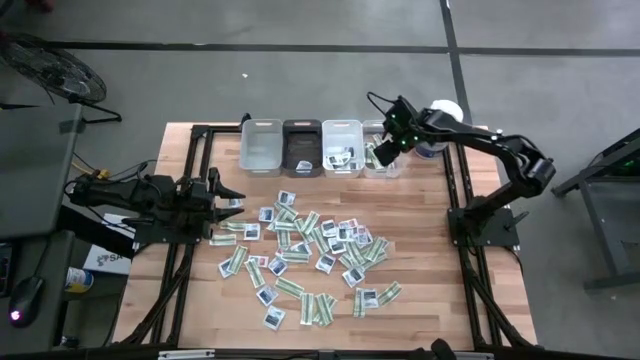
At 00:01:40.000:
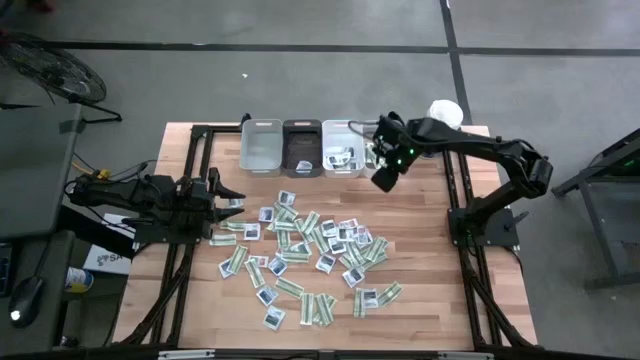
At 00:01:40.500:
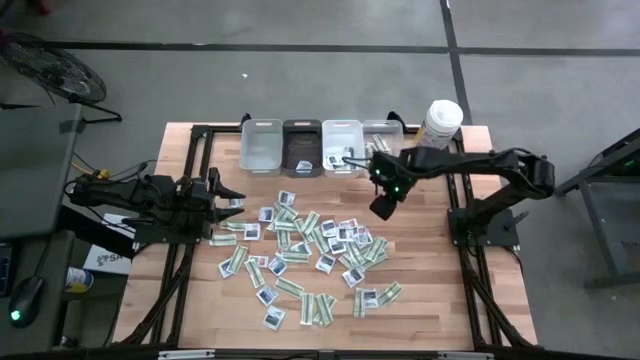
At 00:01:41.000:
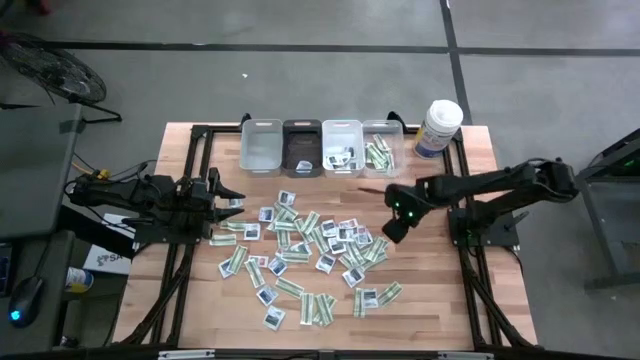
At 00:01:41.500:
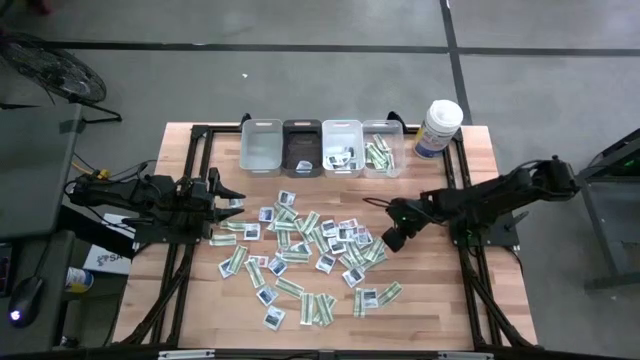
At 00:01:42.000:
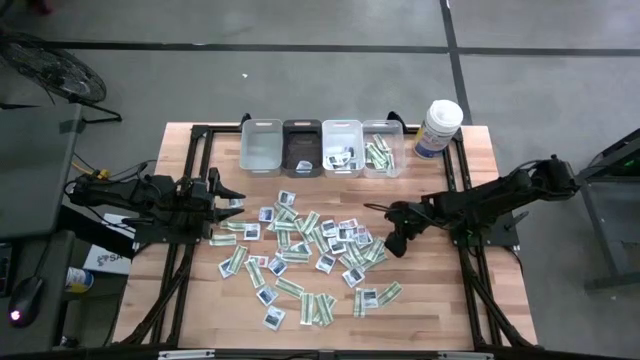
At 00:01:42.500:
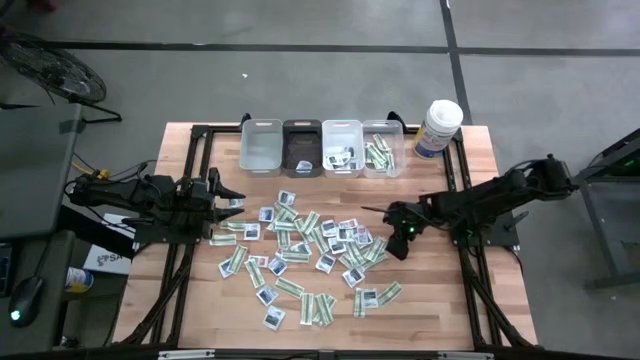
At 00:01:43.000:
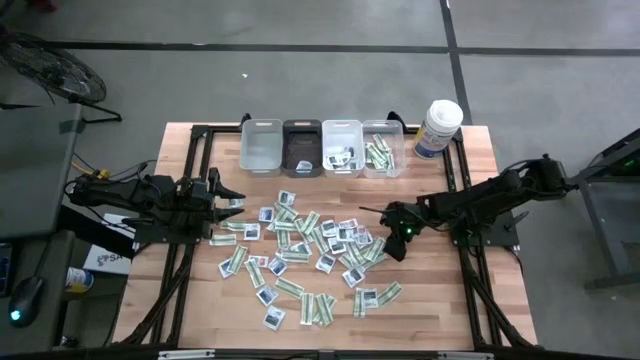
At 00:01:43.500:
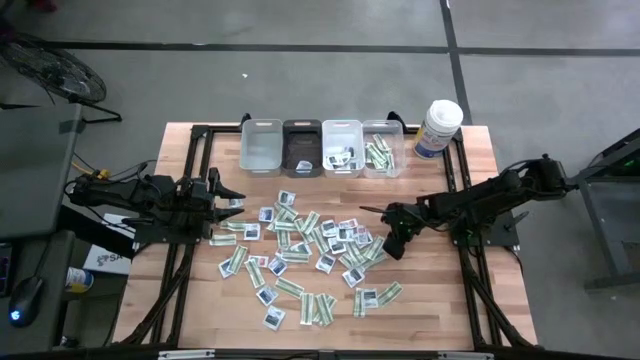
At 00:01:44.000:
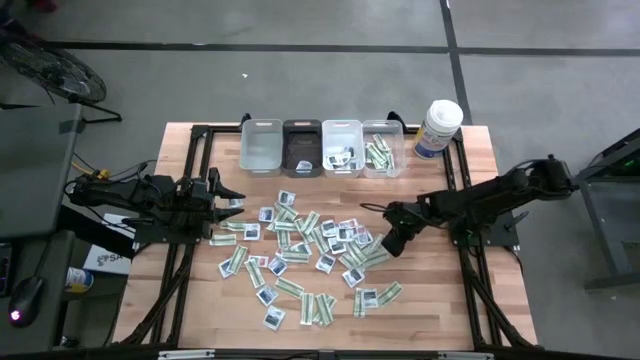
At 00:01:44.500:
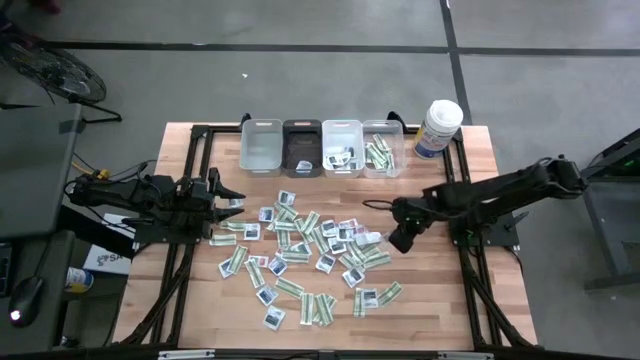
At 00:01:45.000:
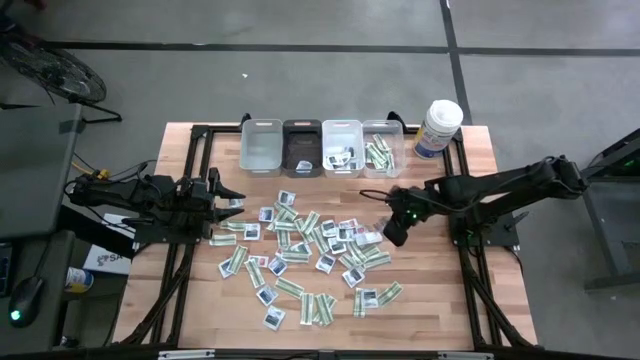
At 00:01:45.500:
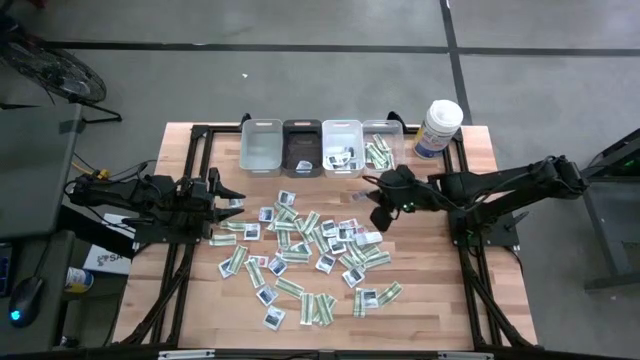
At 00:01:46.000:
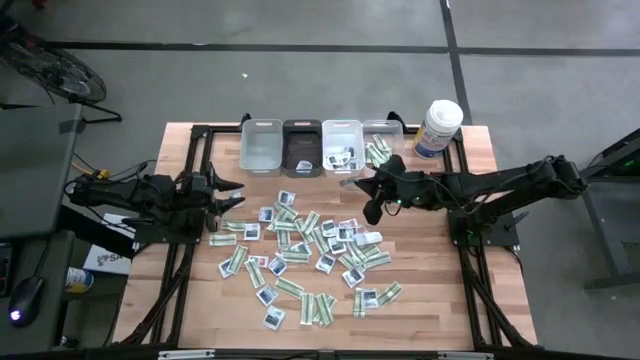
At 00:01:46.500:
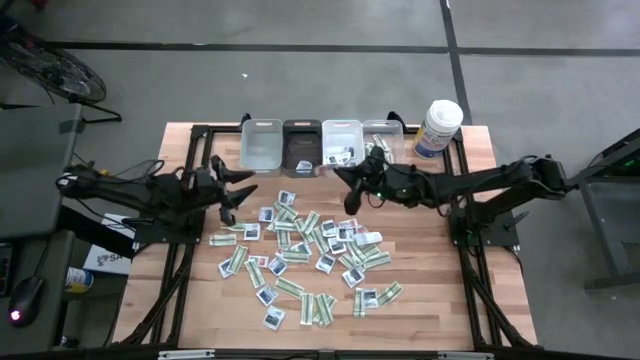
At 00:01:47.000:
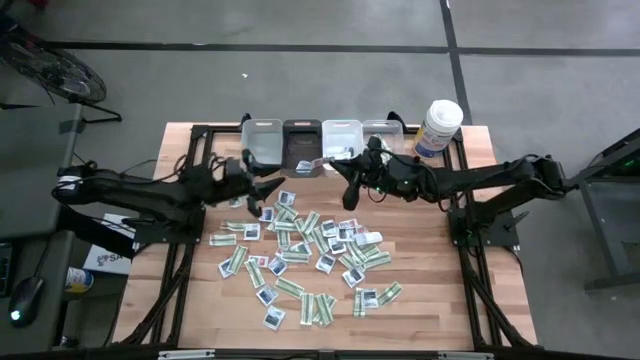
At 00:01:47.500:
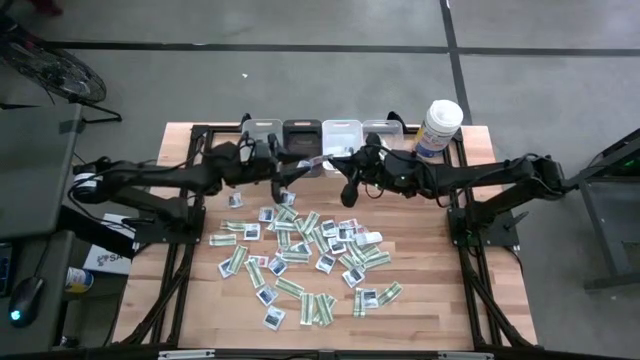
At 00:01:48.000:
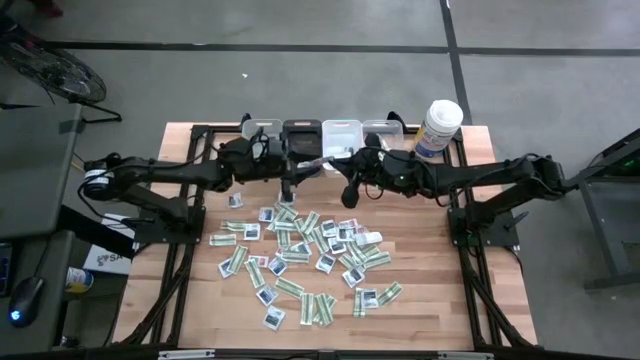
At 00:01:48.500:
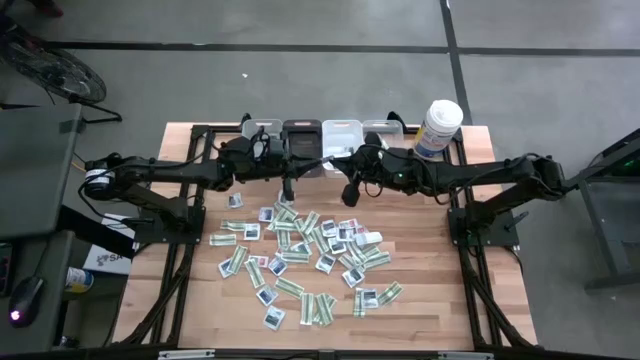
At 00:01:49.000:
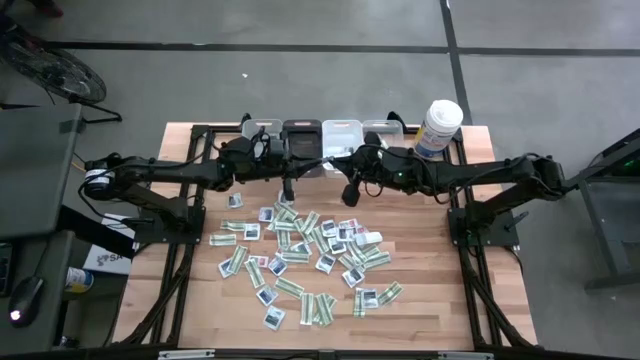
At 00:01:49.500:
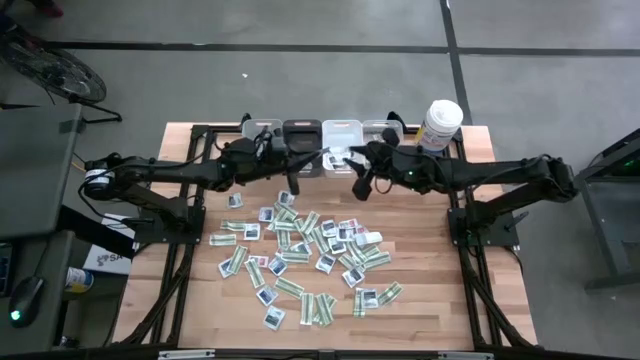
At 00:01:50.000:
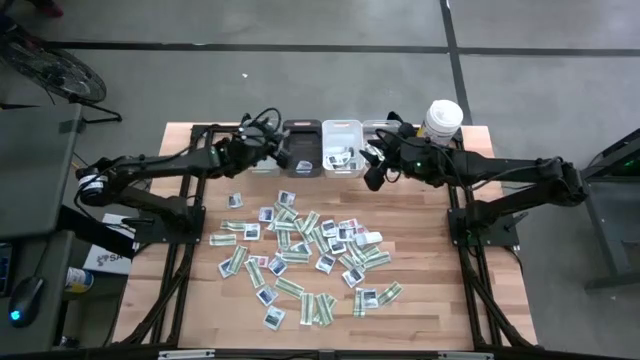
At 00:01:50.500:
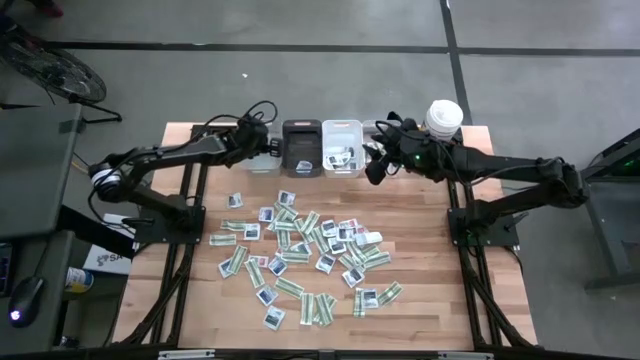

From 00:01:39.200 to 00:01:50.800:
Task: Pick & Place First Aid Supplies
Put the orange ointment pack into the gray bin

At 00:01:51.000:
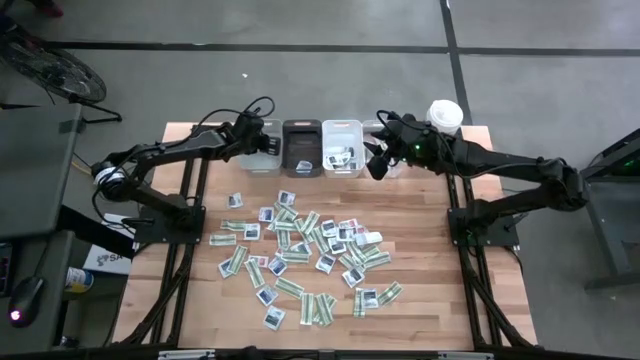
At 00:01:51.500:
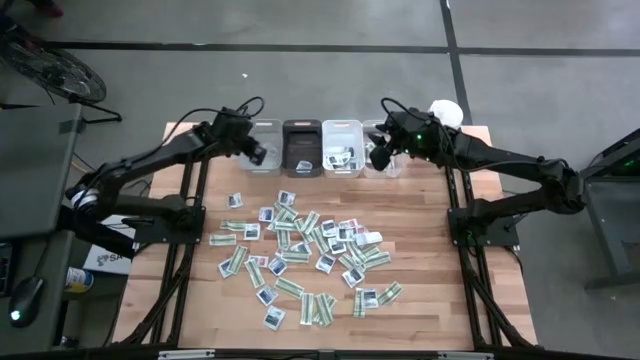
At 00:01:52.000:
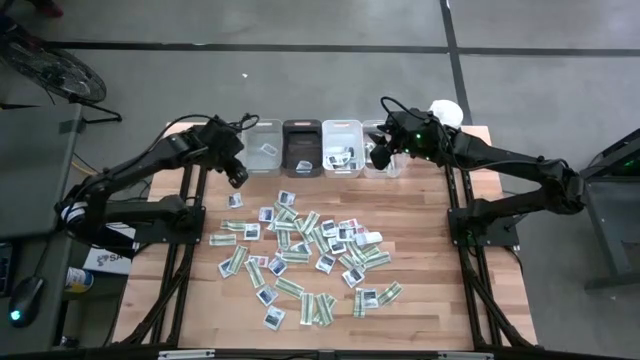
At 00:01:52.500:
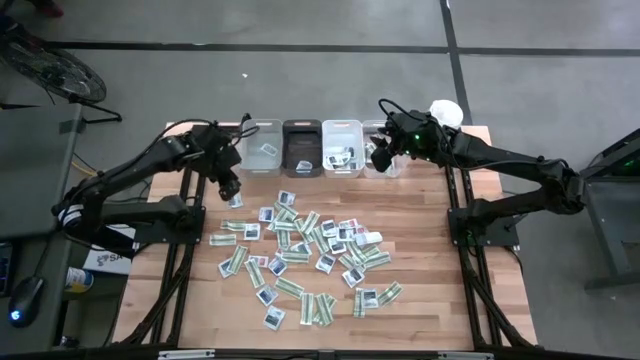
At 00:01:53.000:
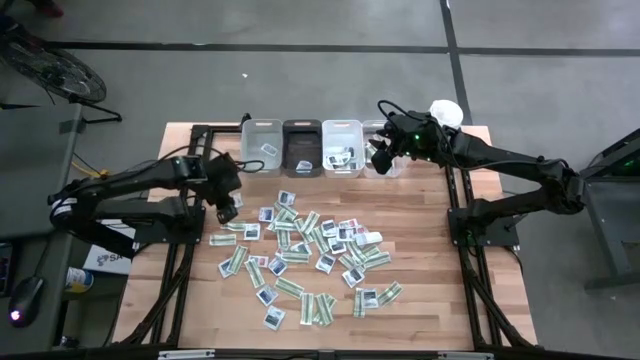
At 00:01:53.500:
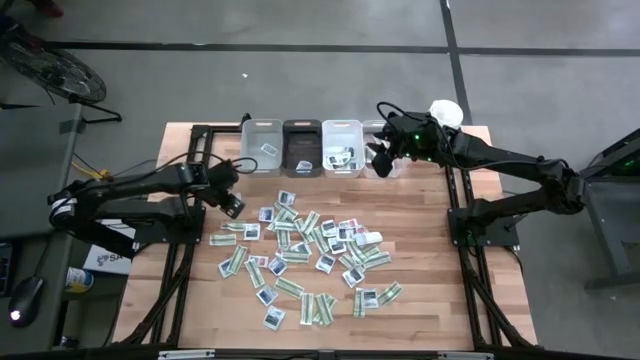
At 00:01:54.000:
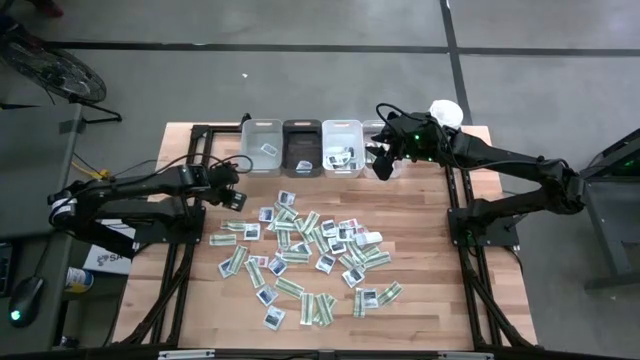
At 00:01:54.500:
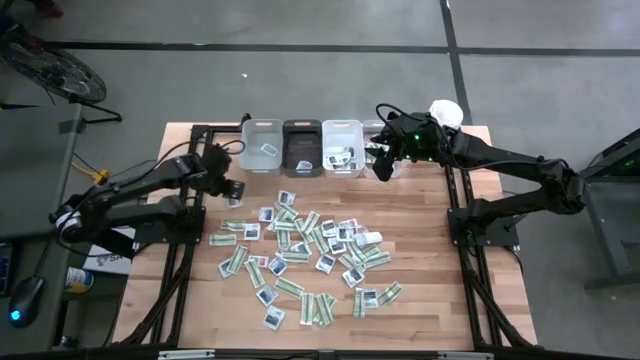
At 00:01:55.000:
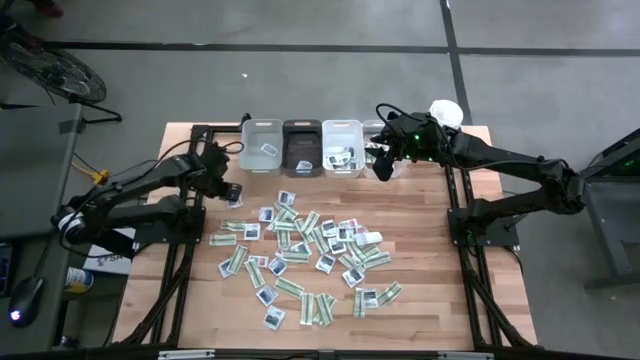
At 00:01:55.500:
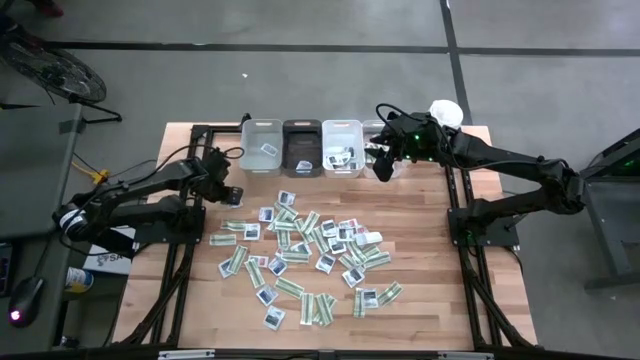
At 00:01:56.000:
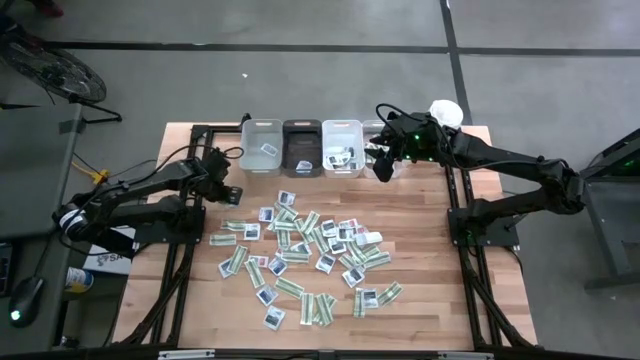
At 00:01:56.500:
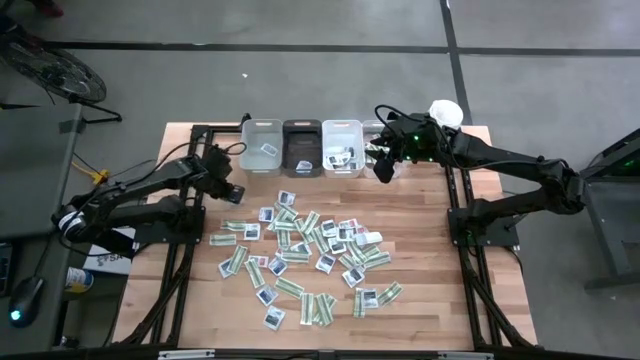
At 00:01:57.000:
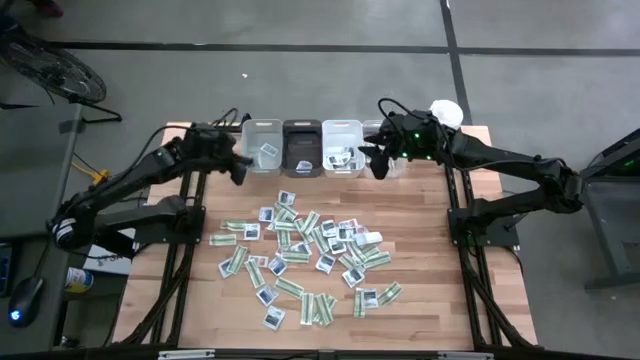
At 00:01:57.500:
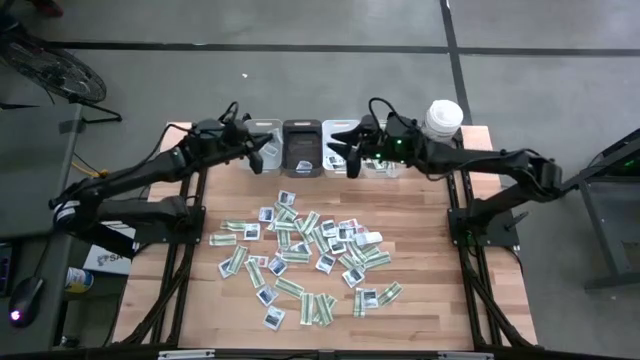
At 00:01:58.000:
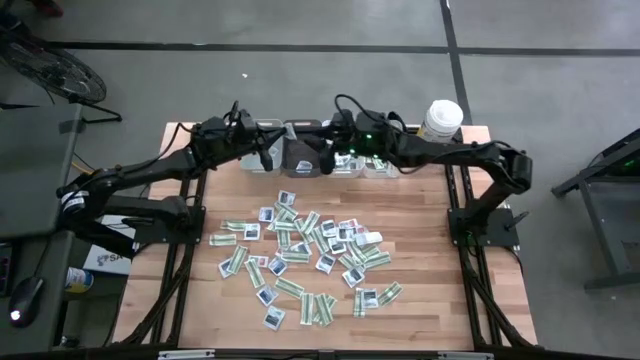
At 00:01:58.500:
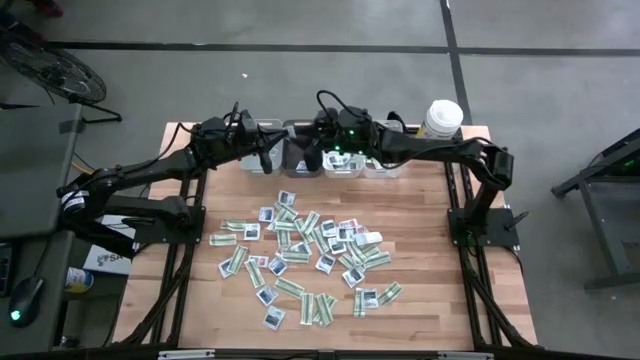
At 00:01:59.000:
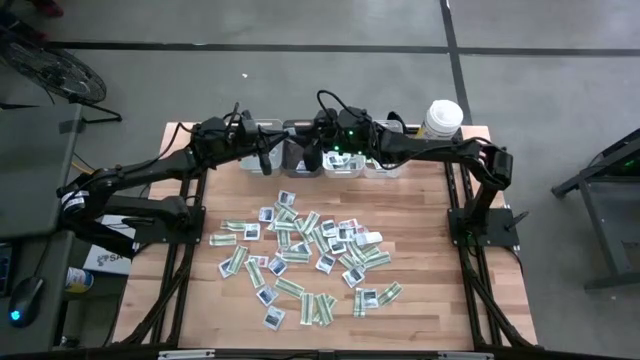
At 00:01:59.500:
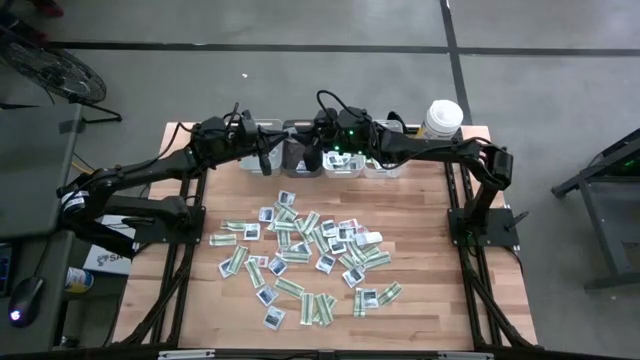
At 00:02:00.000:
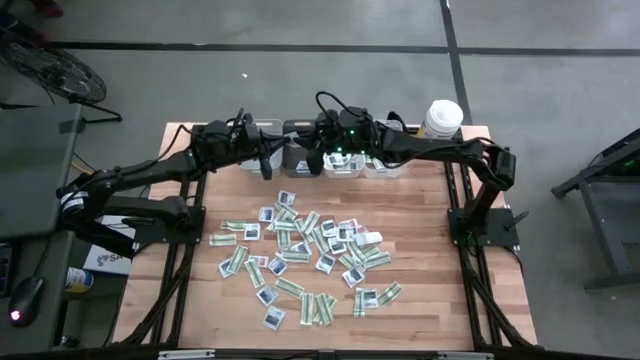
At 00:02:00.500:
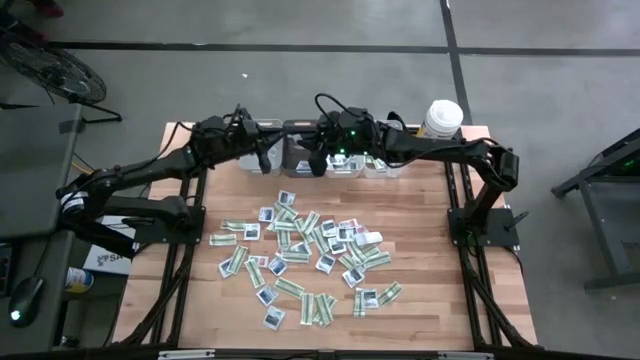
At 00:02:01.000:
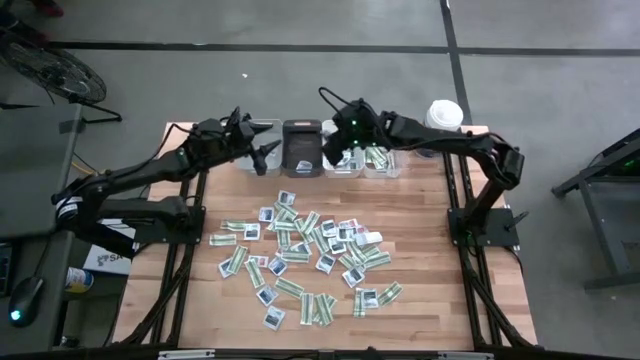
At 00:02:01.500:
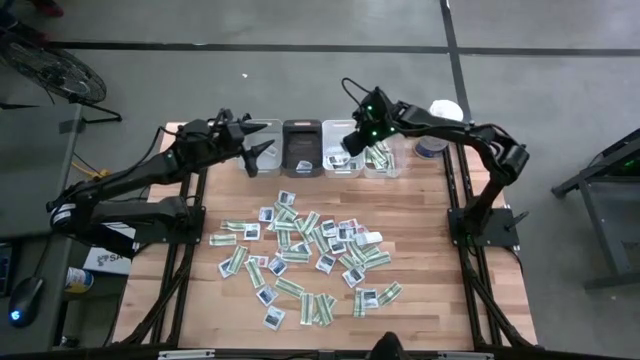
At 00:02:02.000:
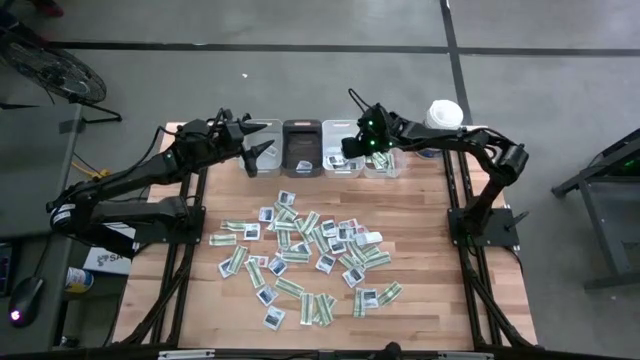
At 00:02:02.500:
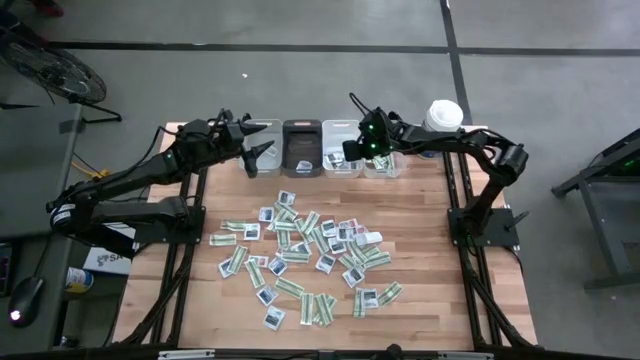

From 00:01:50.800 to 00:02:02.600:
Put the black towelette pack into the white bin
